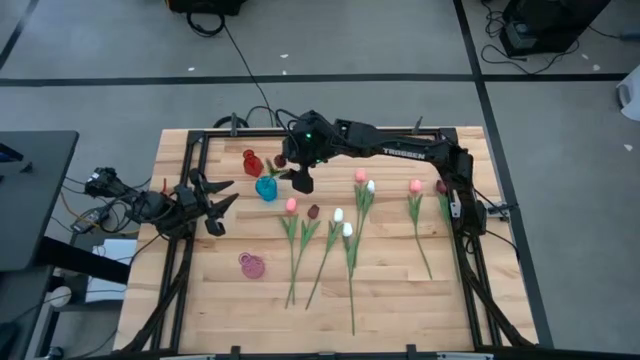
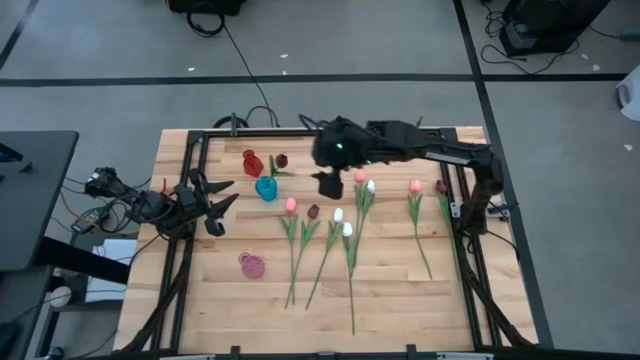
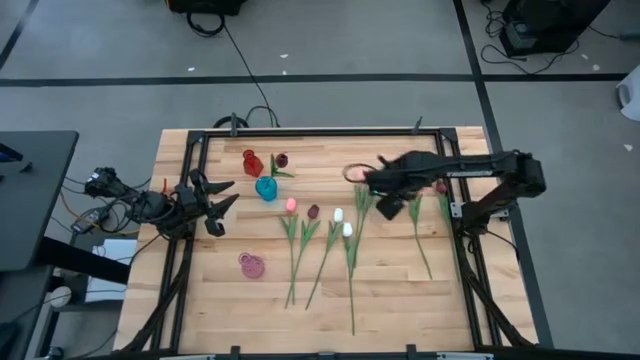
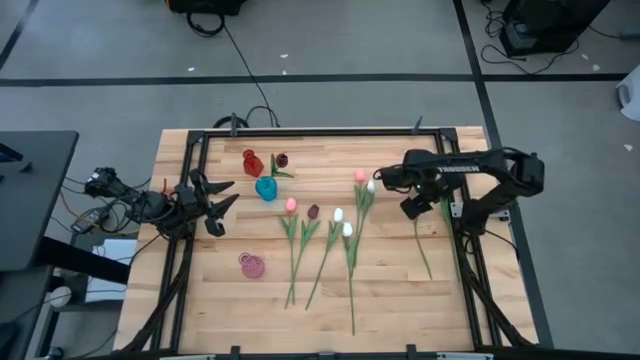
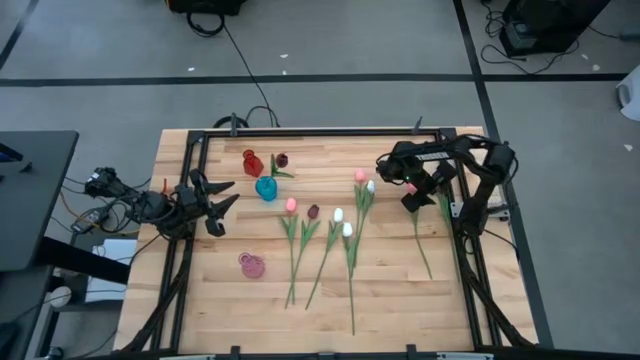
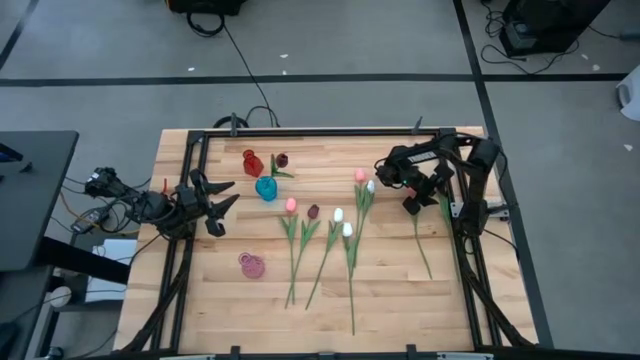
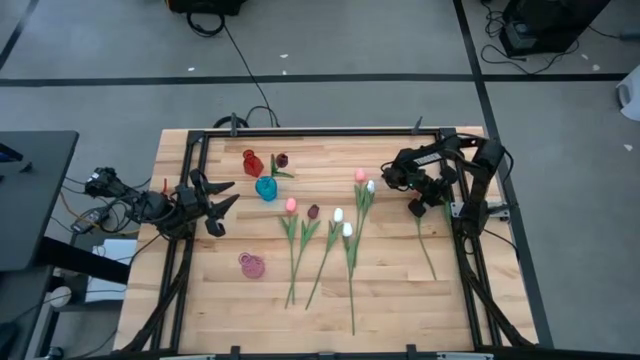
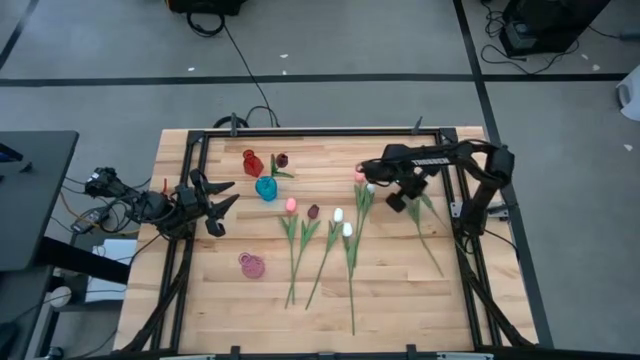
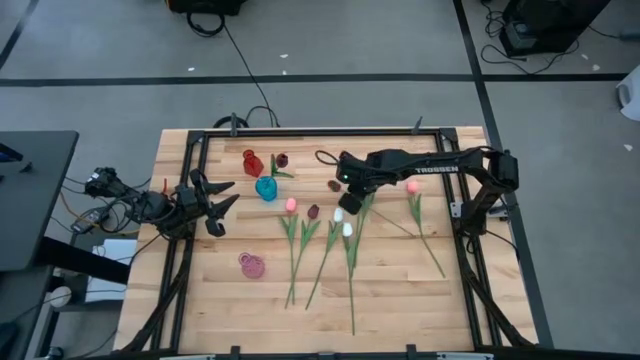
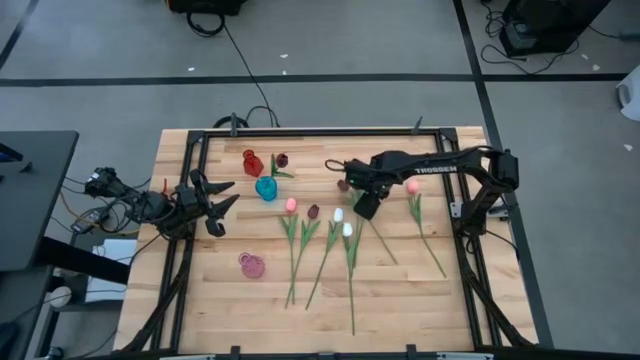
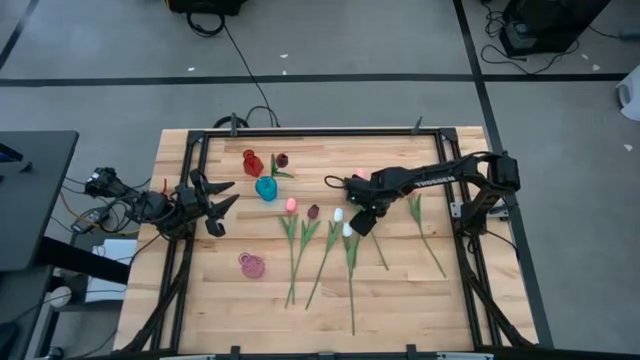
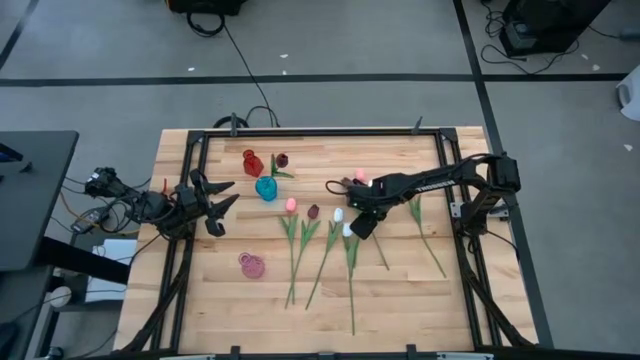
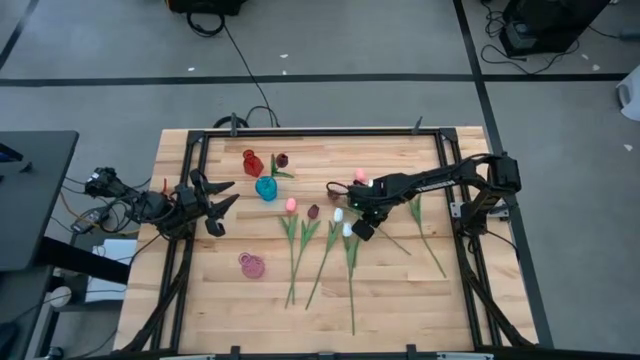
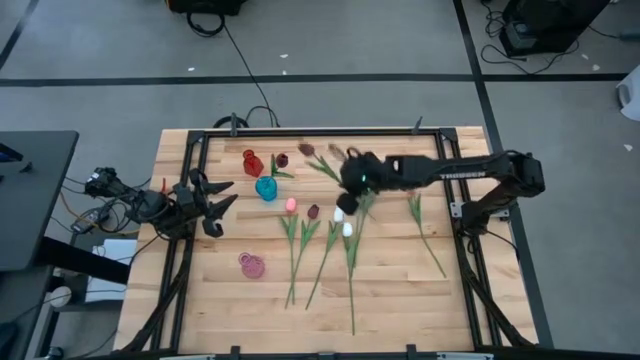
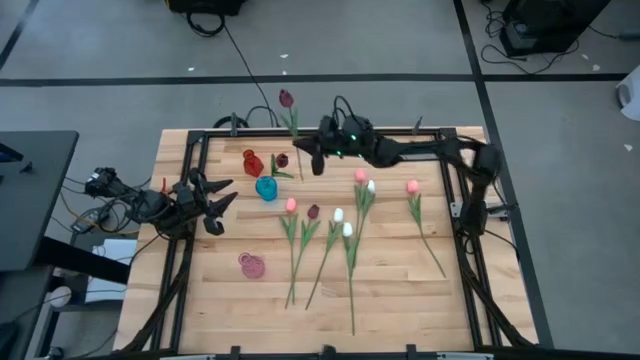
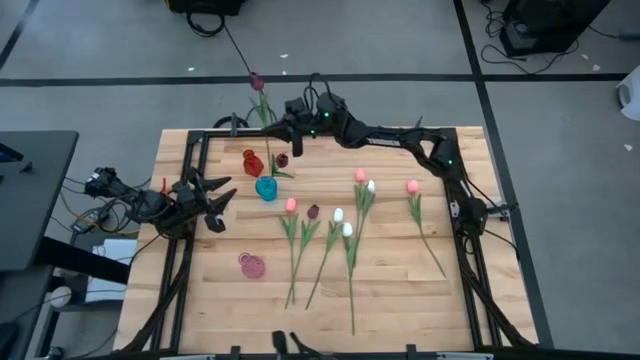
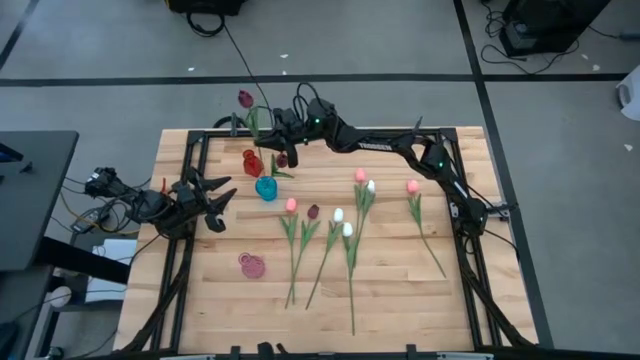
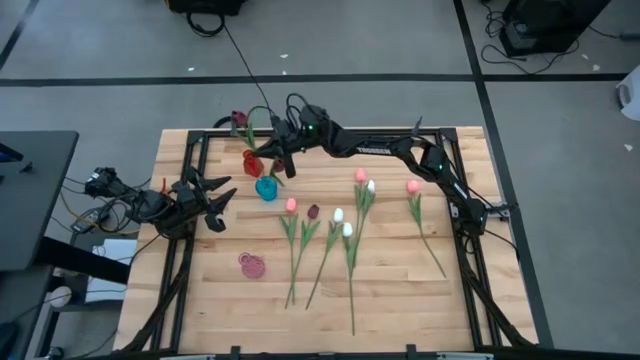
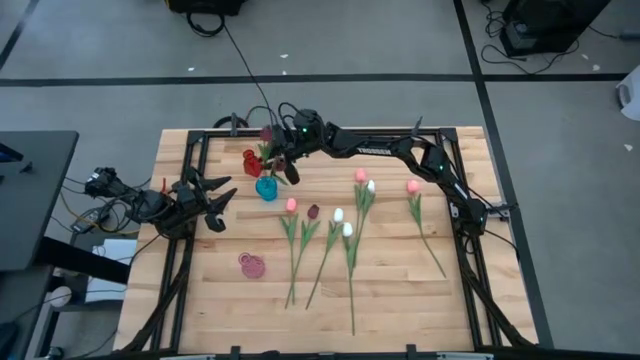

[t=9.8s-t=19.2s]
Task: Sort flowers into vase by color
Put the right red flower into the blue vase

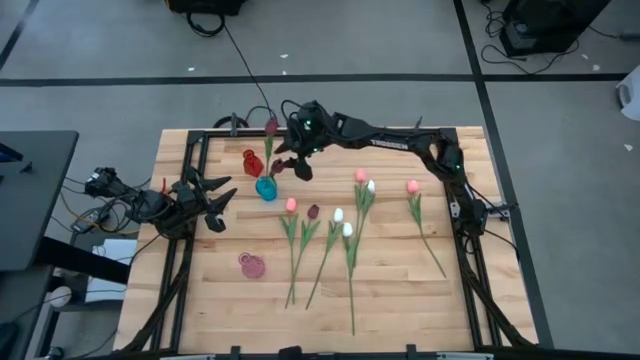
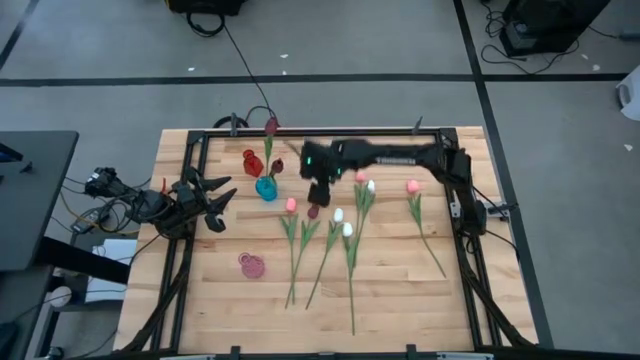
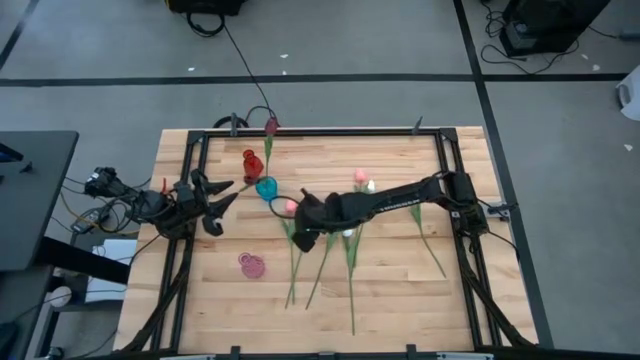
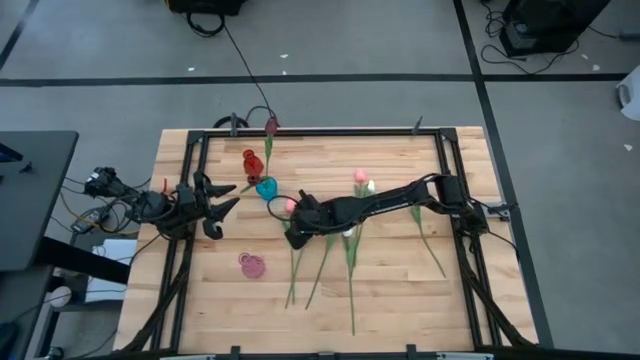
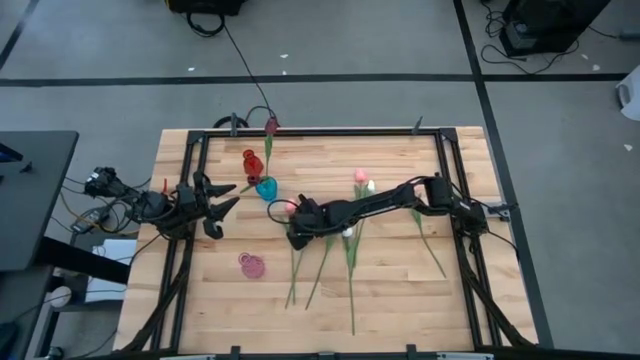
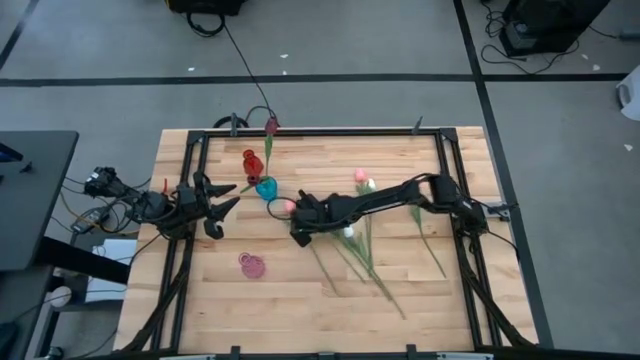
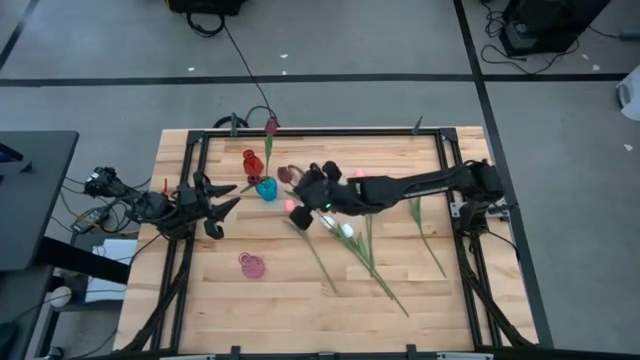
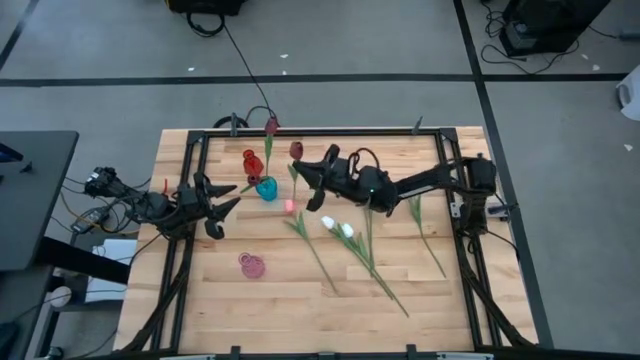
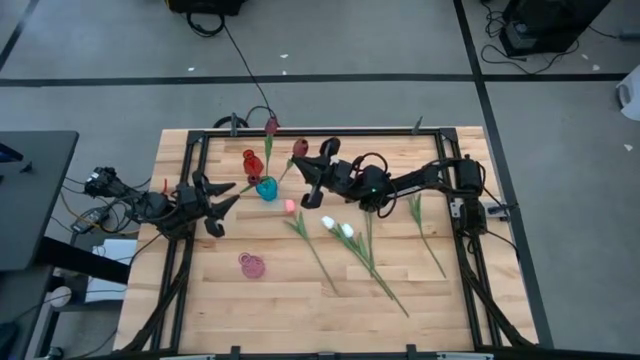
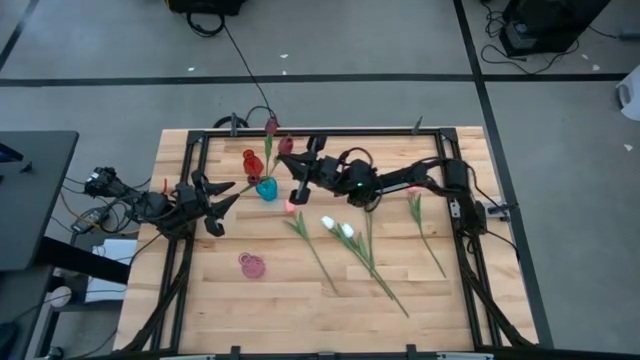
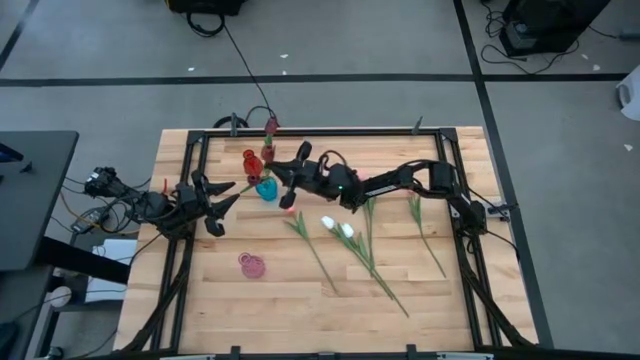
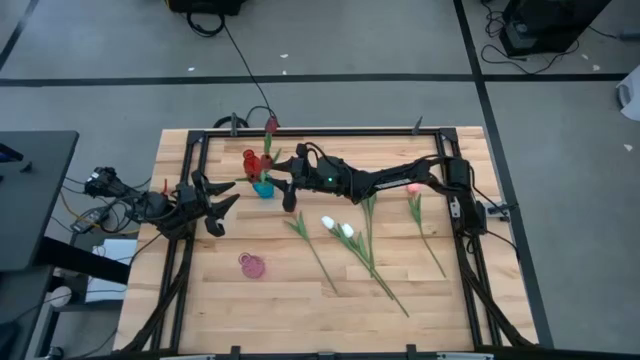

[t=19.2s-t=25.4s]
Put the red flower into the purple vase

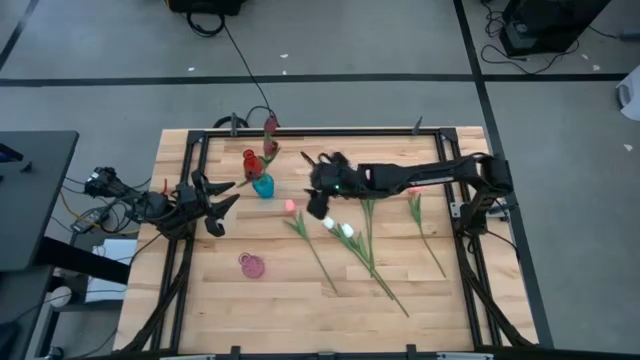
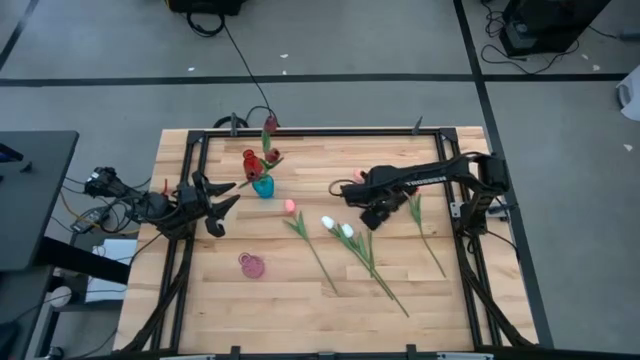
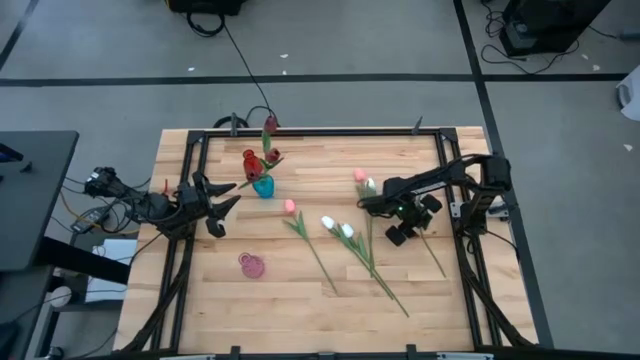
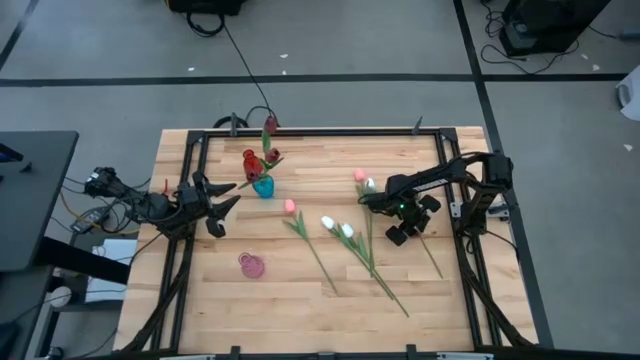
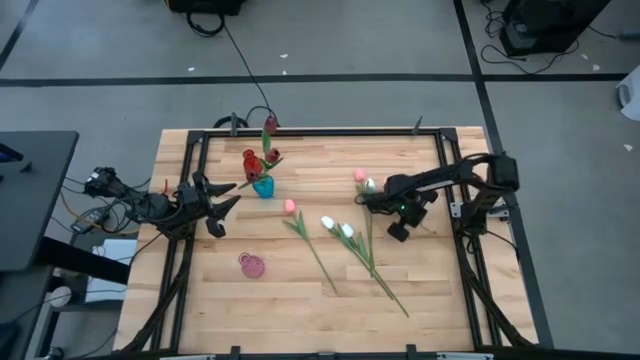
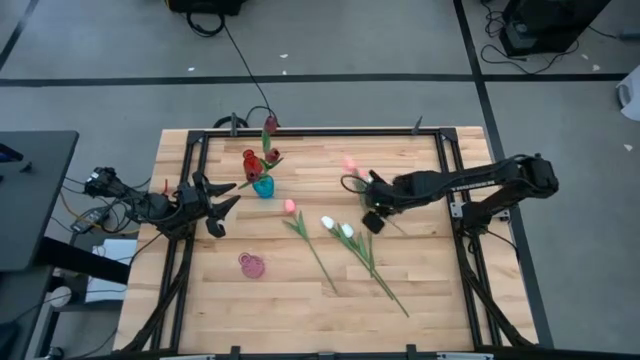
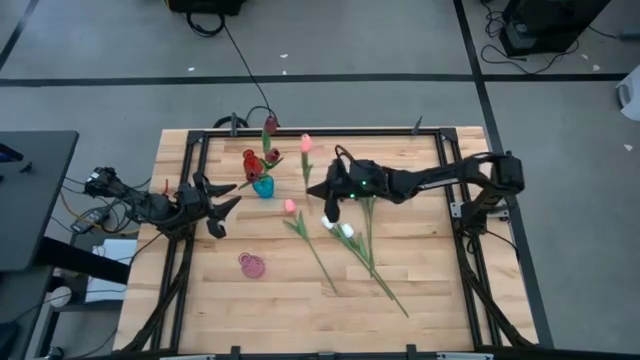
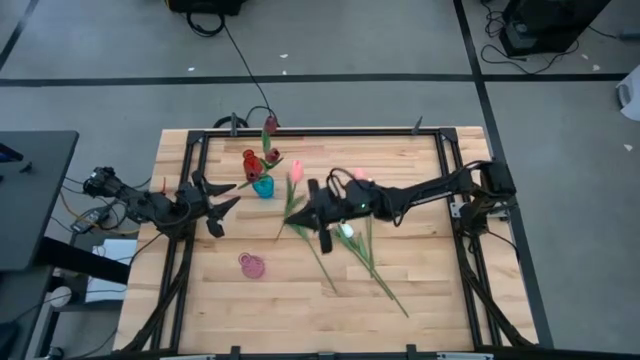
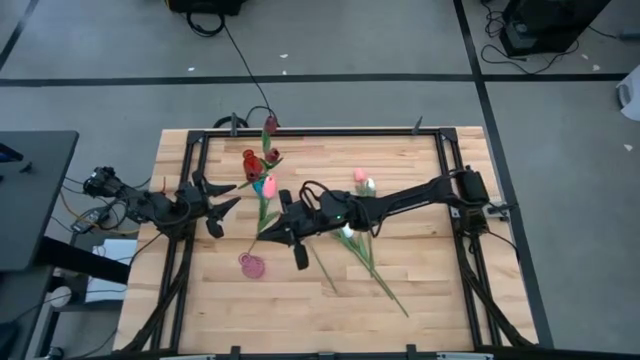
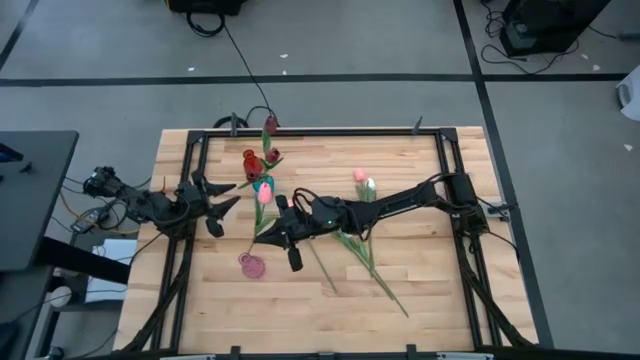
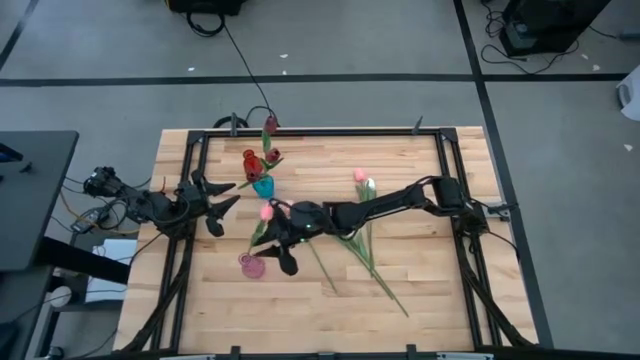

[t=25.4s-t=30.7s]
Put the right pink flower into the purple vase

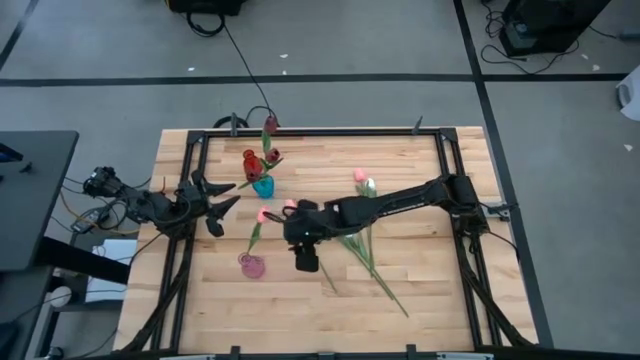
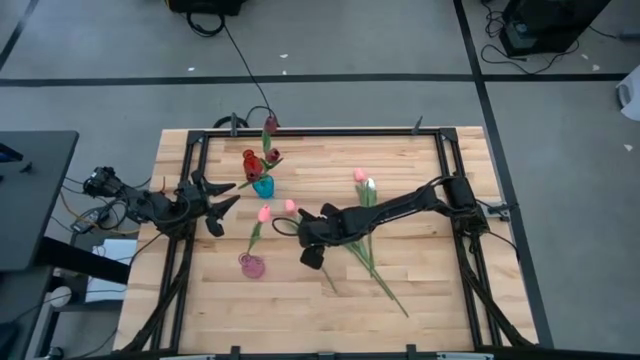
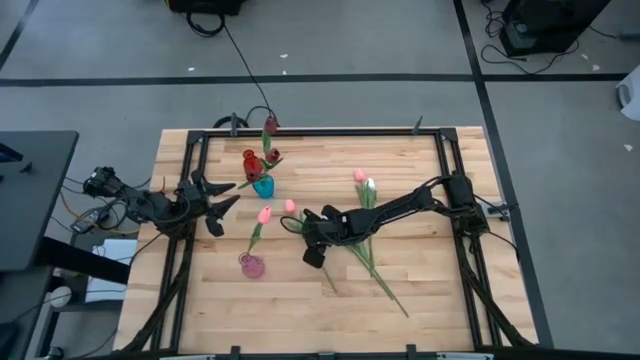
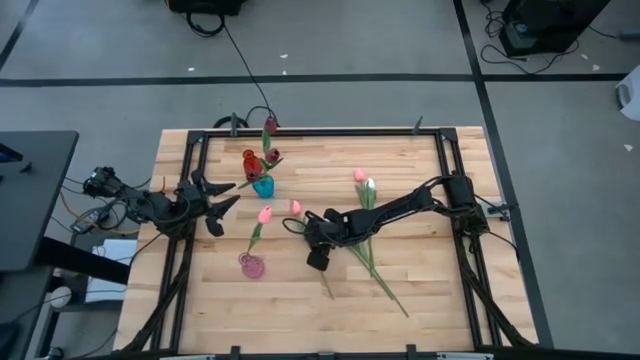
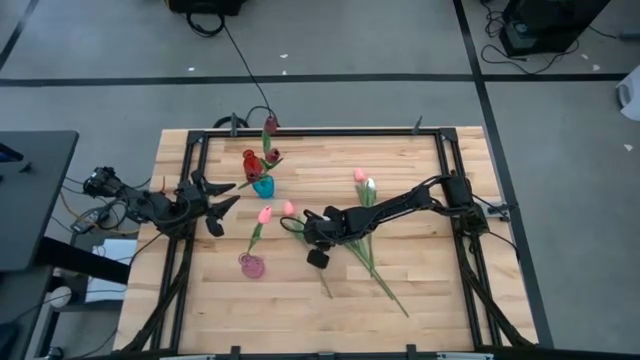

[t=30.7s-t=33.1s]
Put the left pink flower into the purple vase
